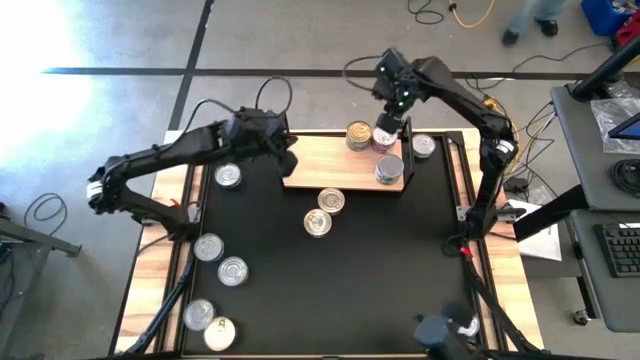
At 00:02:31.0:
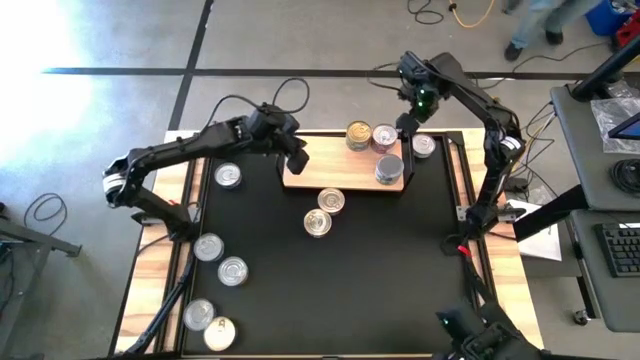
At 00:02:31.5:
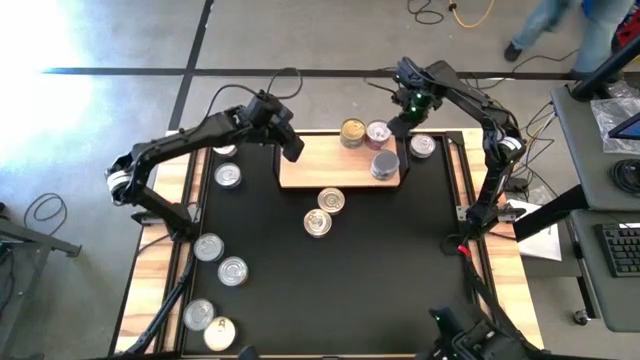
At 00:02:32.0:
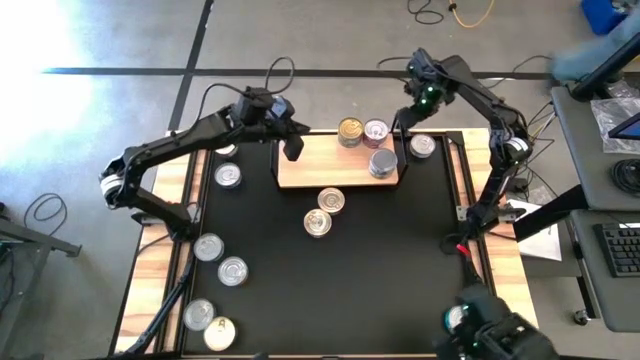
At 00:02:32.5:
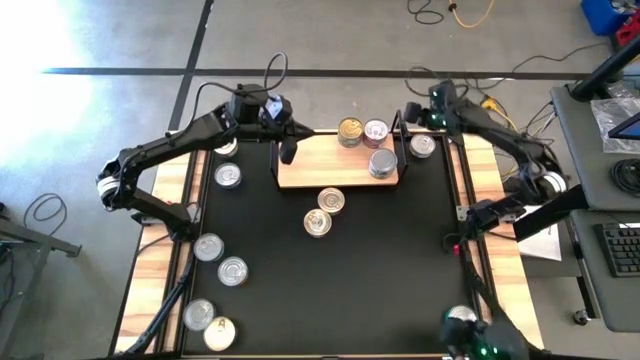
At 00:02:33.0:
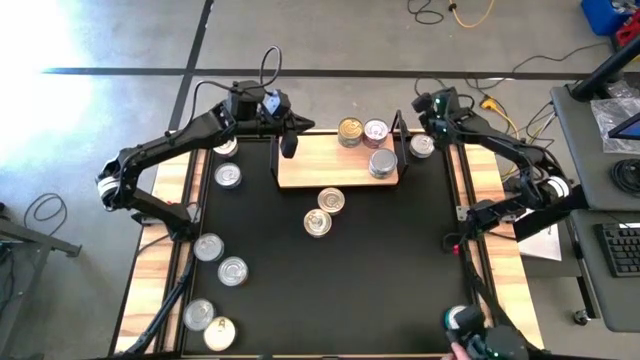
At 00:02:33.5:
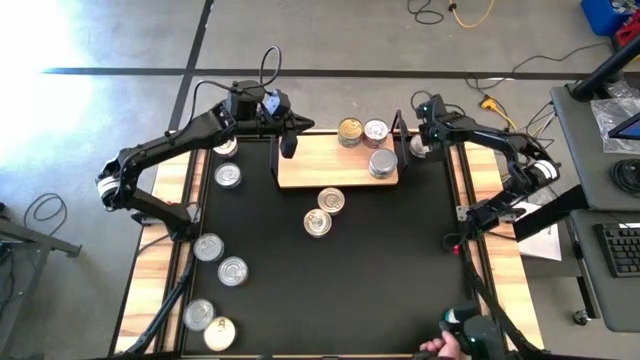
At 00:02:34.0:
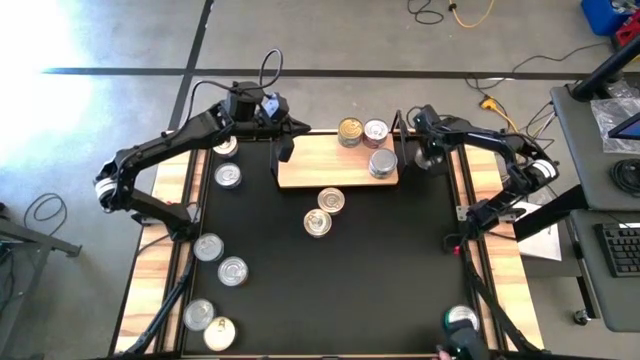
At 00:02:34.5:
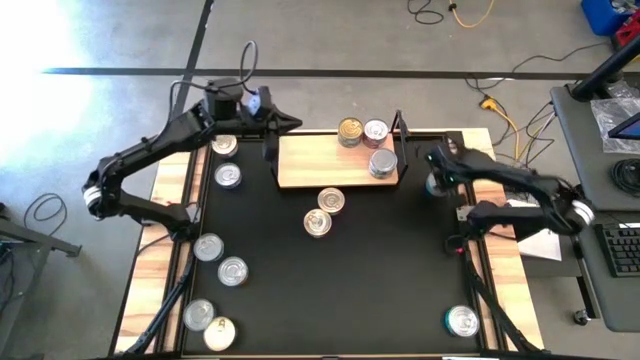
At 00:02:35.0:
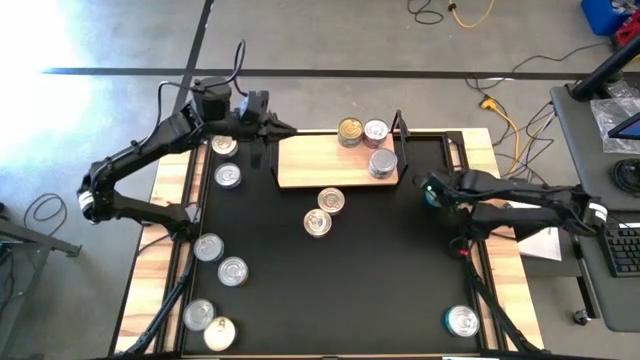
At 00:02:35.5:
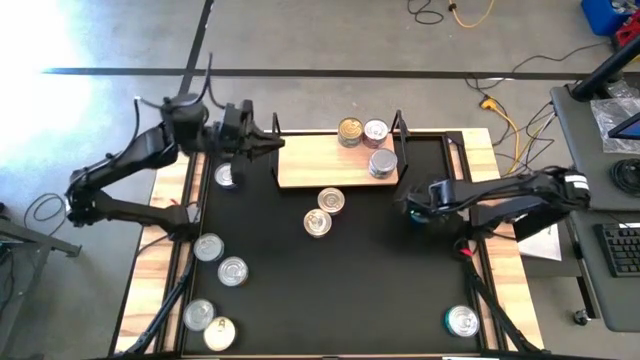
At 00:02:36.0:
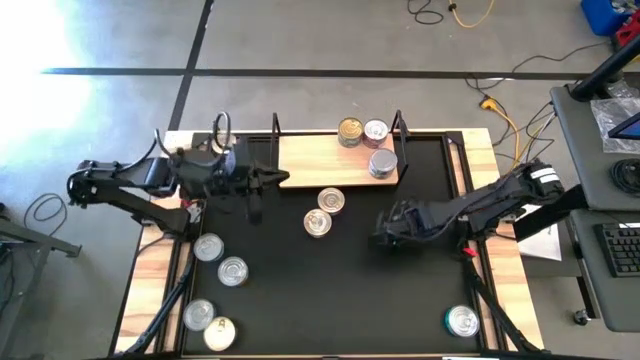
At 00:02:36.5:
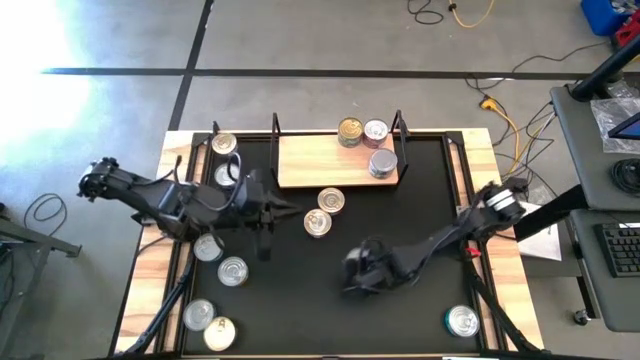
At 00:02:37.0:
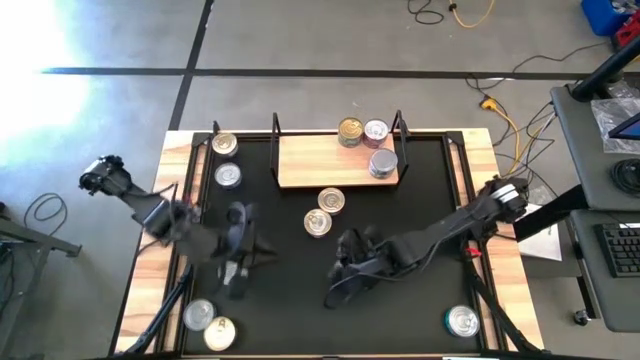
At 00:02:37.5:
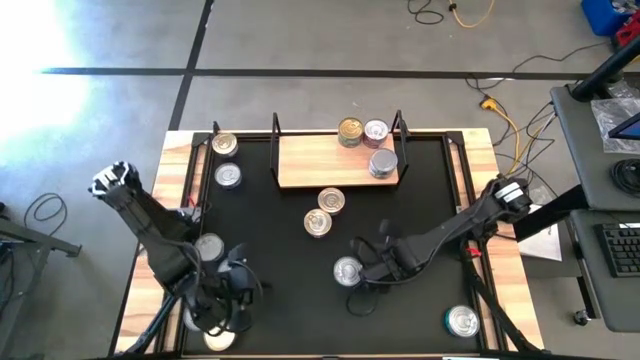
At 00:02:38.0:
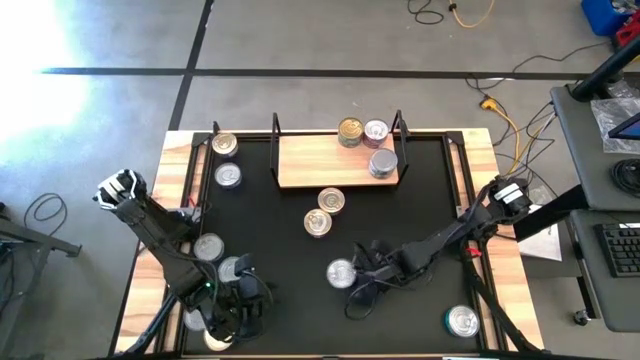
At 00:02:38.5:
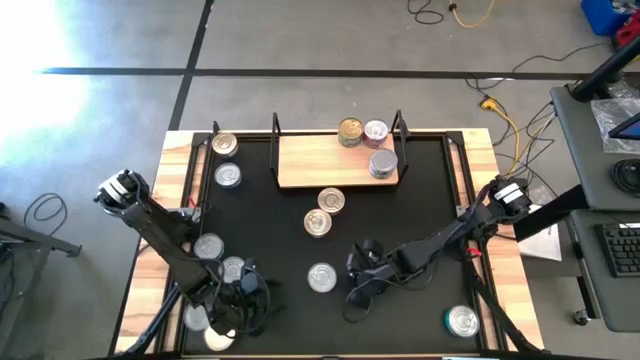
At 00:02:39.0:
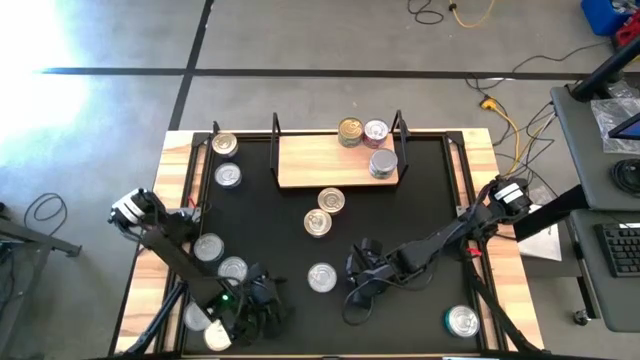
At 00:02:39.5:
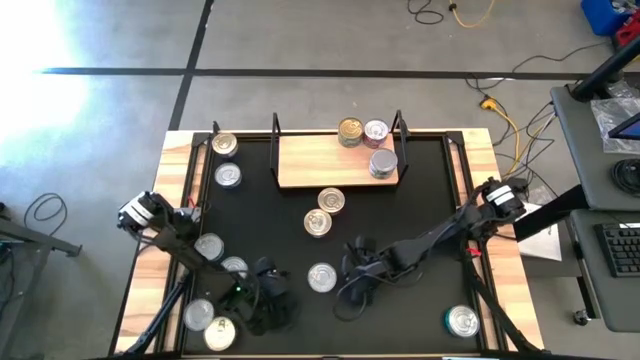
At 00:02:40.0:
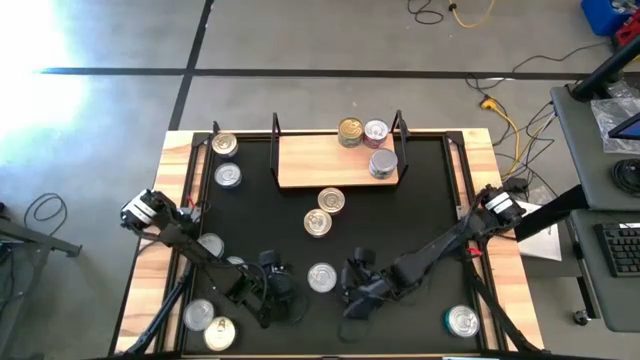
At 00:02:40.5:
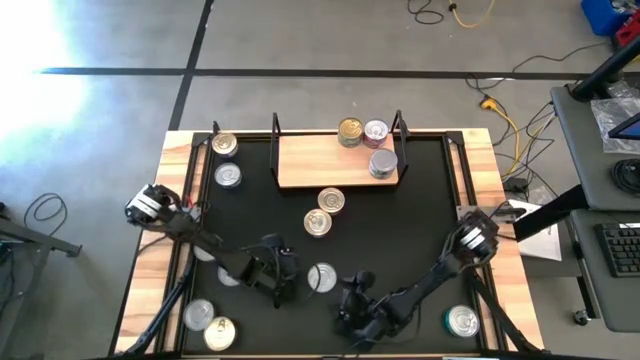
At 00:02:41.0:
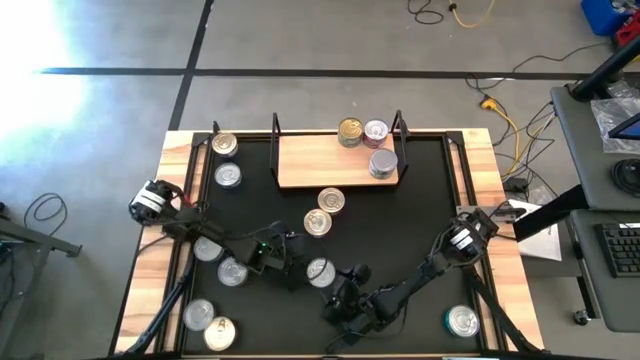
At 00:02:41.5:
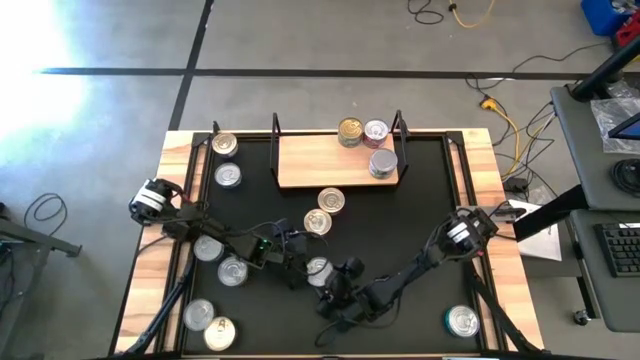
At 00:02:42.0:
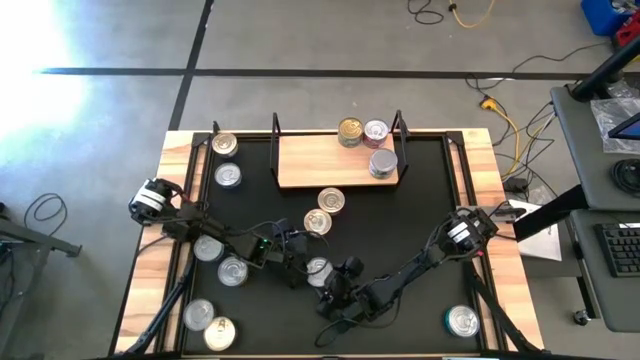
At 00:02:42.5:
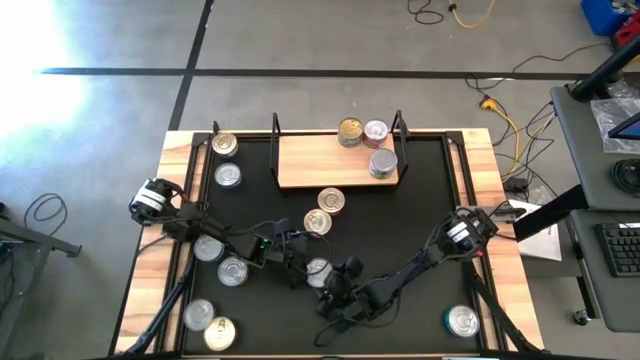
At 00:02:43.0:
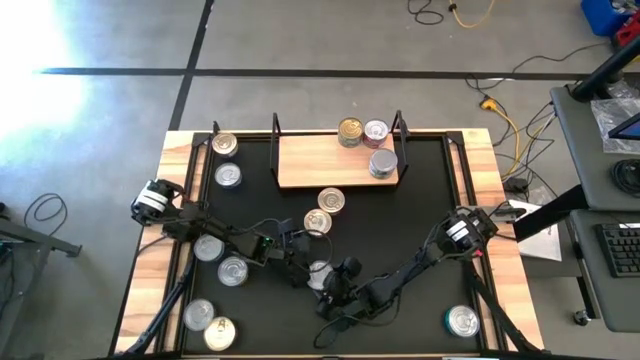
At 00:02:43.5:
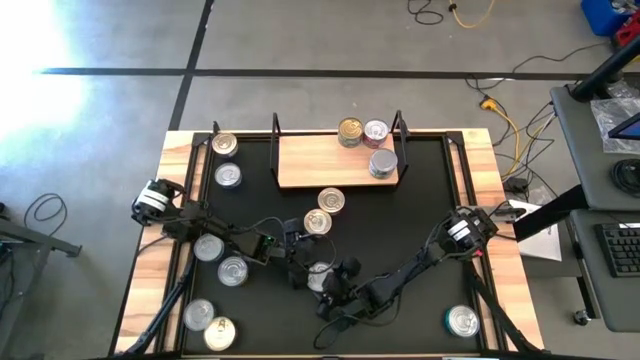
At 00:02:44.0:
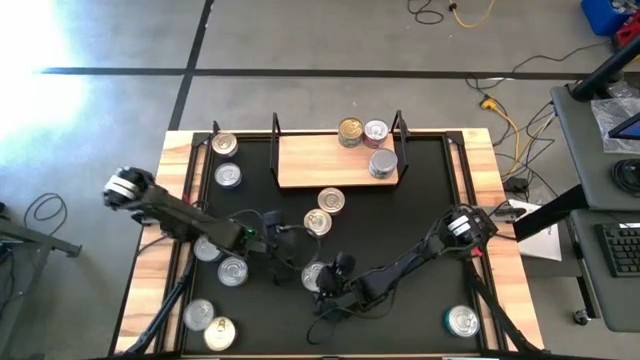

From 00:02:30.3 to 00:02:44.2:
Task: Stack canned seafood by type on shelf
Put the yellow-blue tuna can on the shelf
